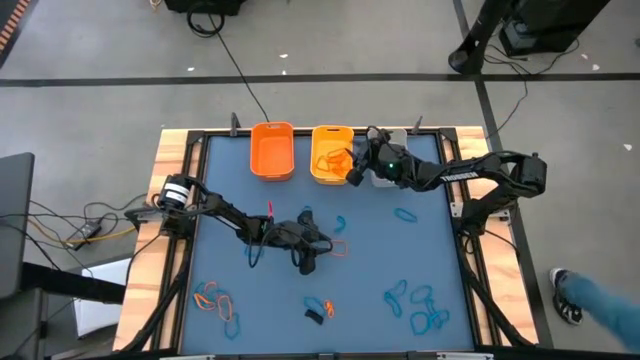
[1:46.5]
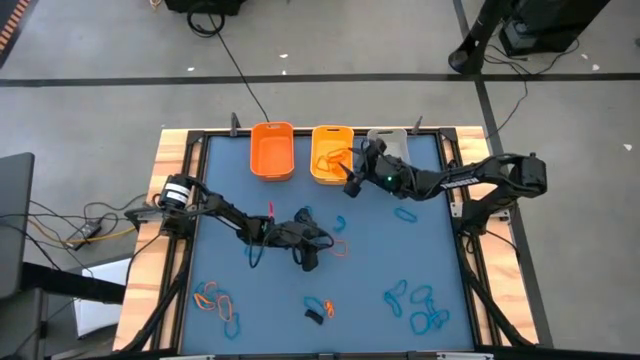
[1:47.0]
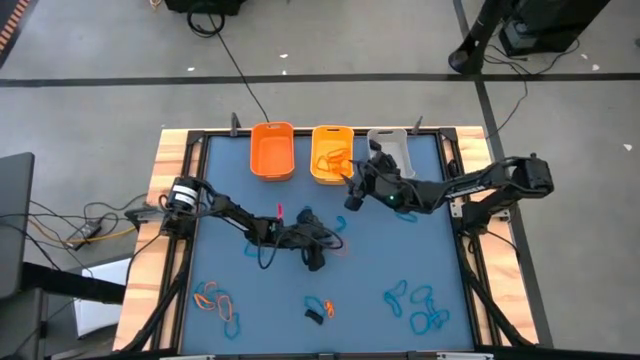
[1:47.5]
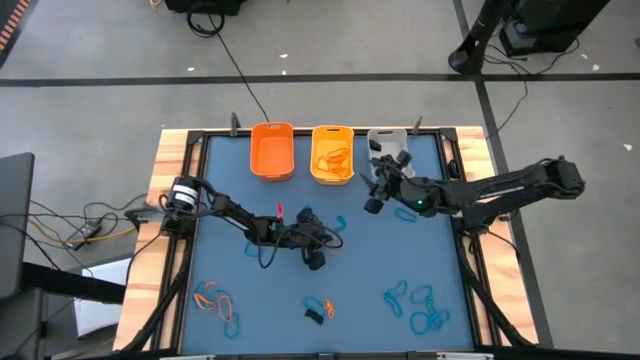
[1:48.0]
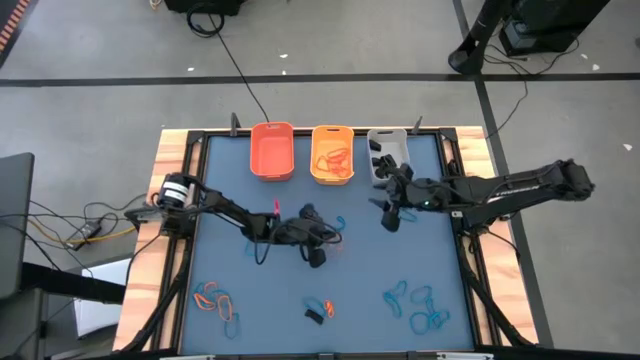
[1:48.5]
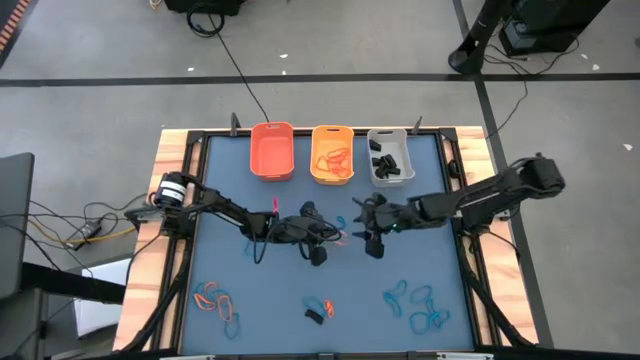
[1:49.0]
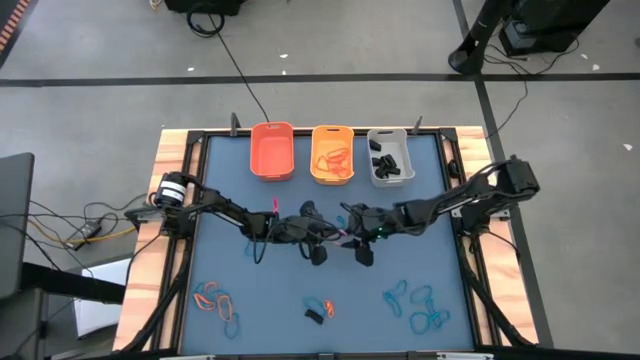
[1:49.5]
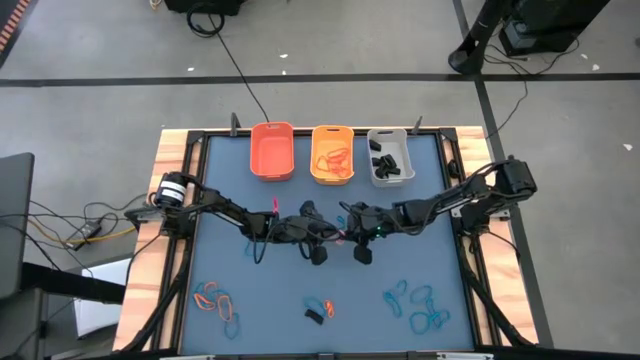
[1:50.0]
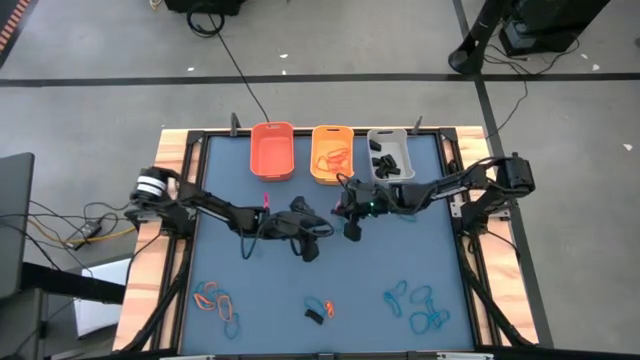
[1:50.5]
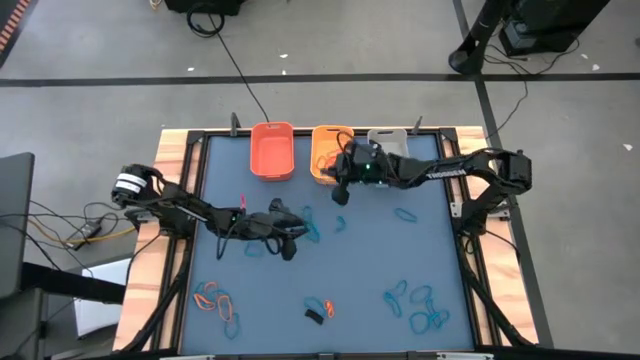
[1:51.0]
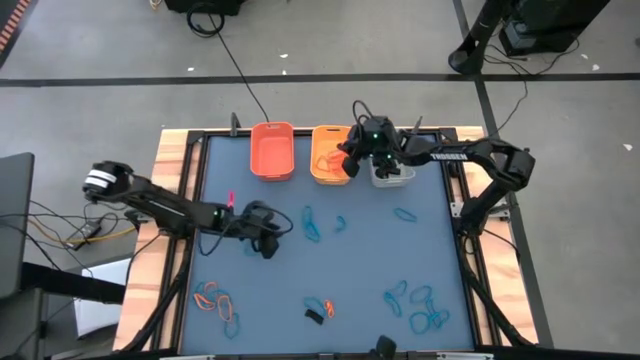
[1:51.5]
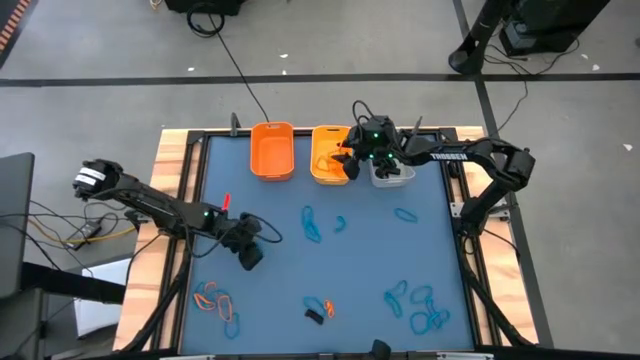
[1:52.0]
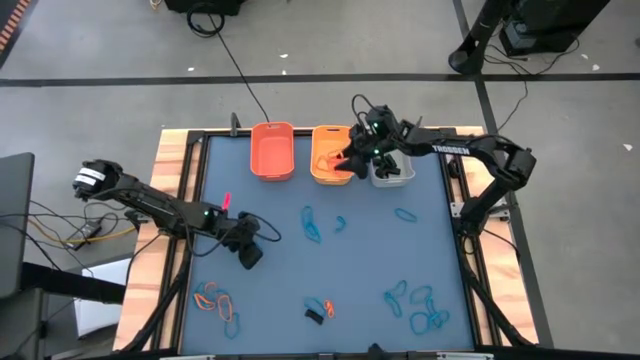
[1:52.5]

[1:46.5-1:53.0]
Task: Sort rubber bands into baskets
Put the orange rubber band into the yellow bin

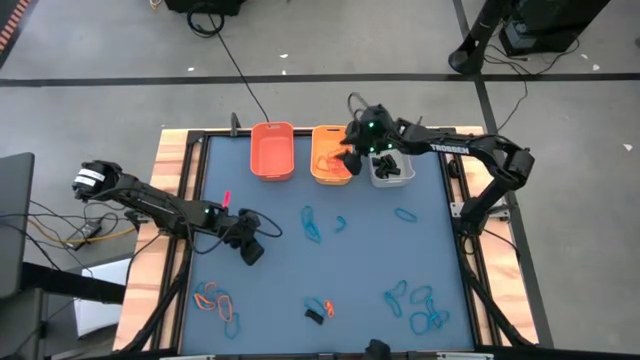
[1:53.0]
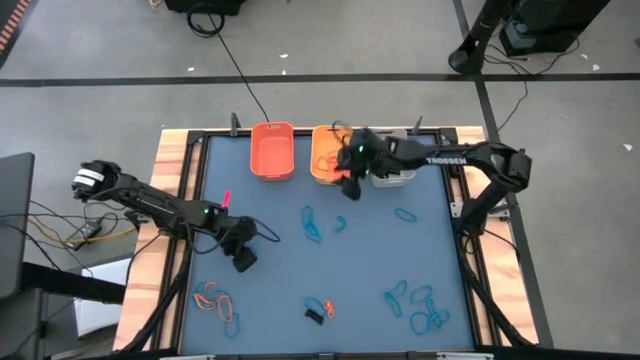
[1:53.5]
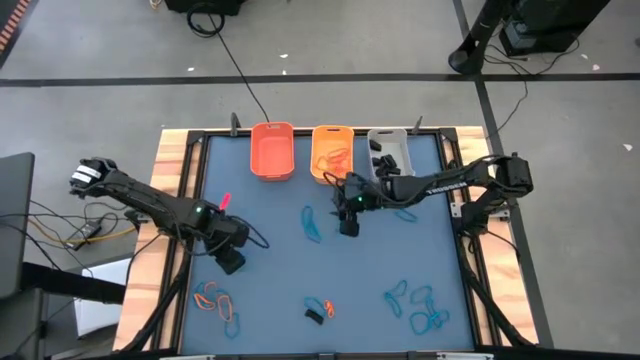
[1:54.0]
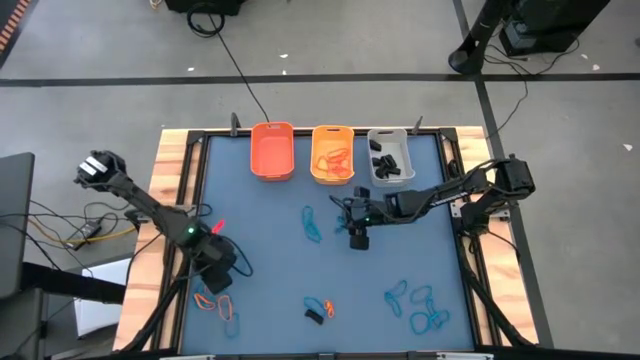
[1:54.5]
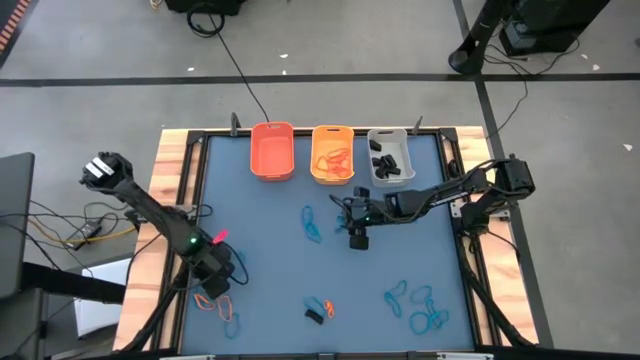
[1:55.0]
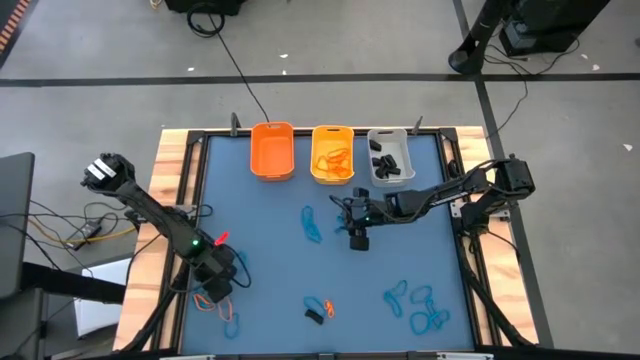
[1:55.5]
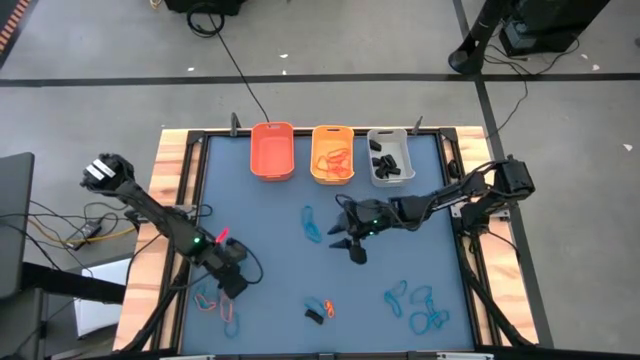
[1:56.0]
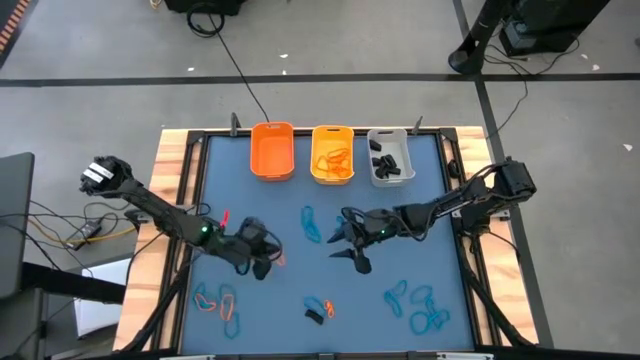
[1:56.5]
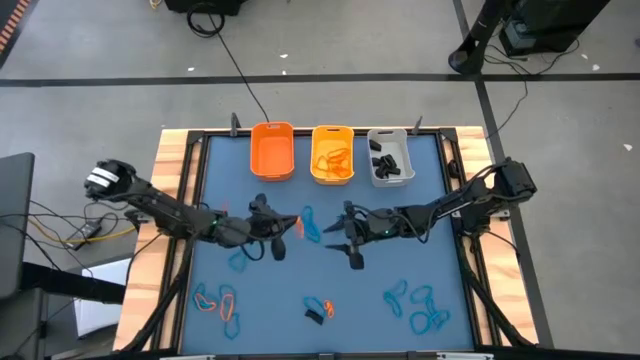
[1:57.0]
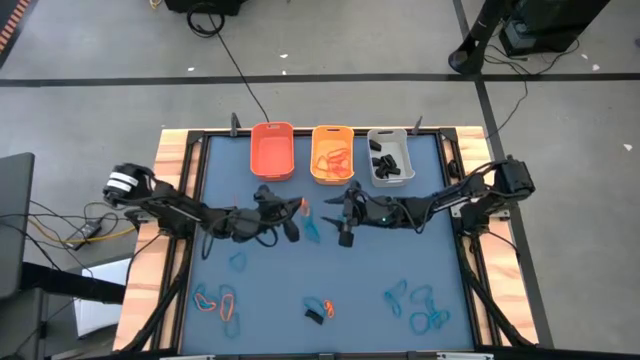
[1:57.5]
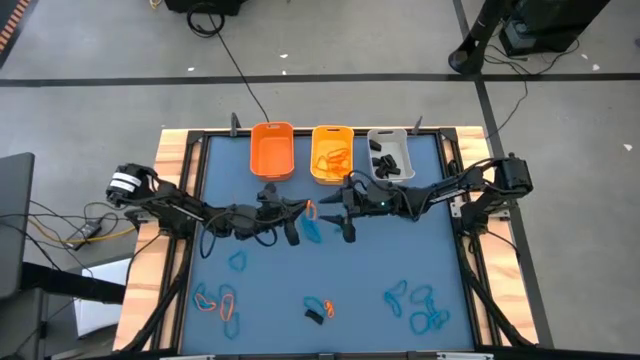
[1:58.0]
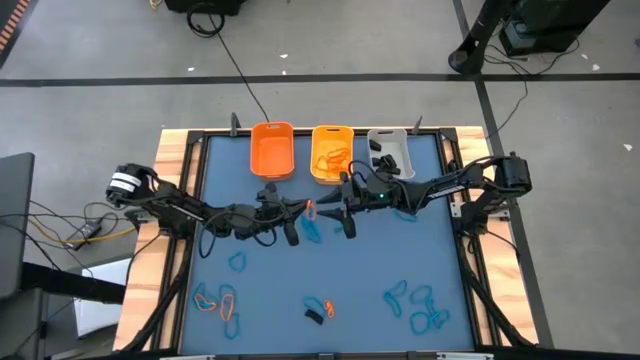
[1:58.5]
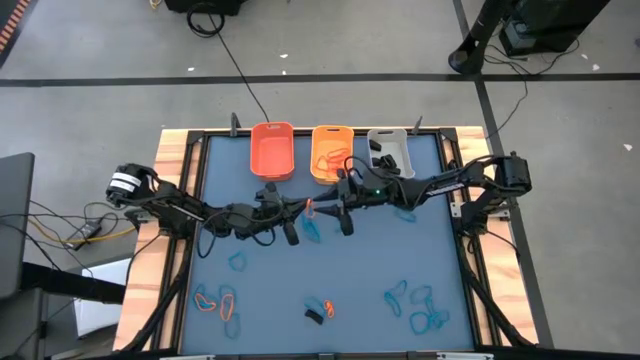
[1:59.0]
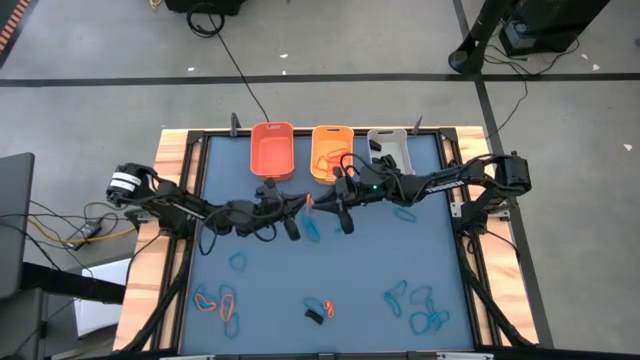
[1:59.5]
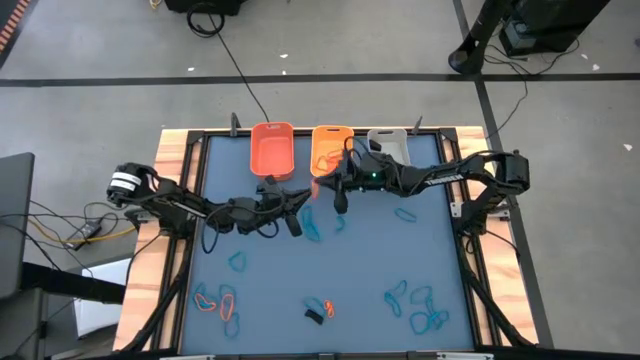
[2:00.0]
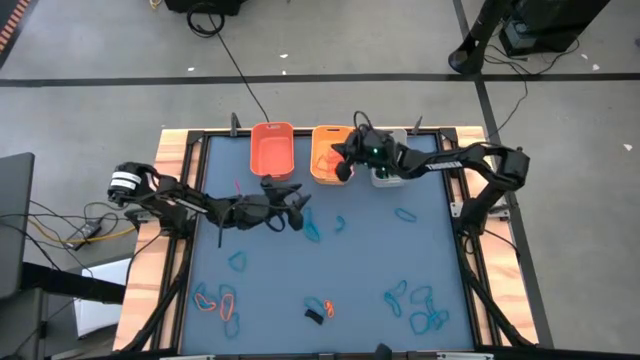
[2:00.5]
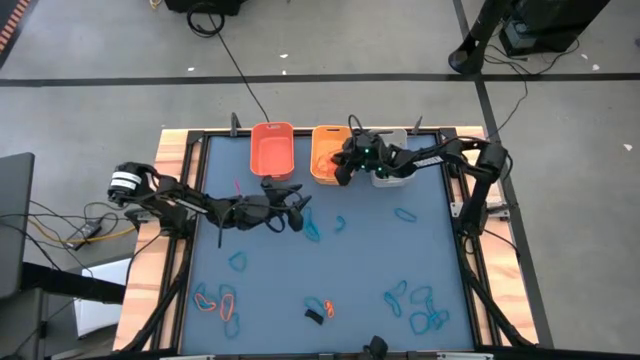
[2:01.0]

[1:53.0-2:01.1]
Put the orange rubber band into the yellow bin

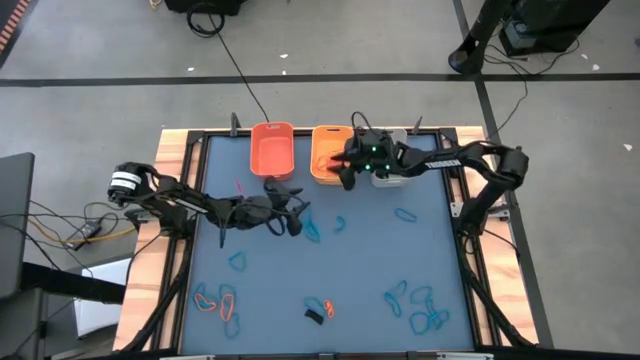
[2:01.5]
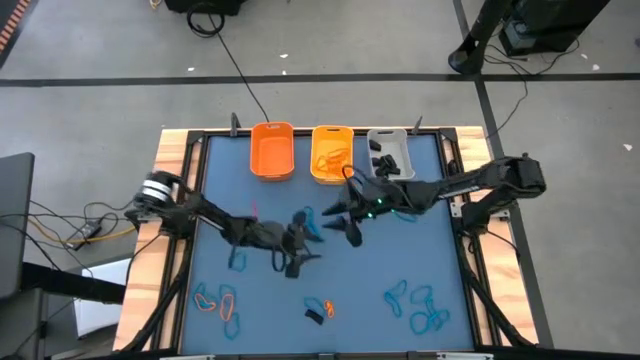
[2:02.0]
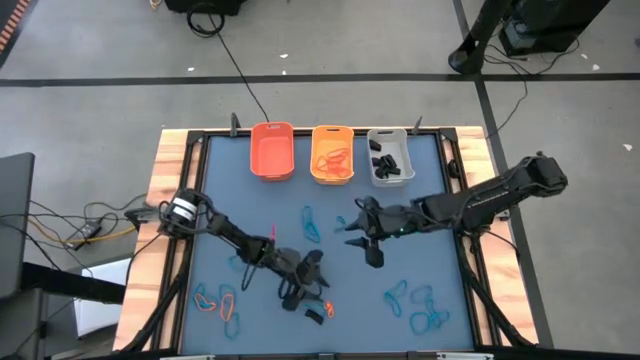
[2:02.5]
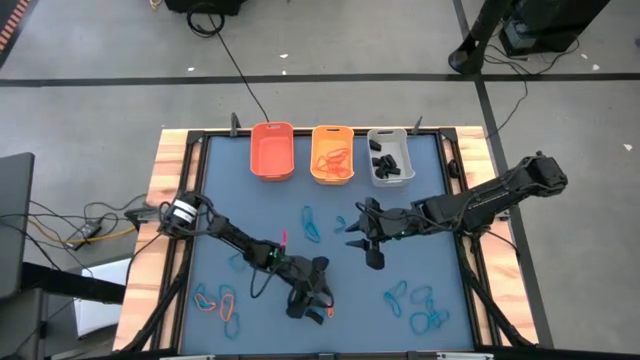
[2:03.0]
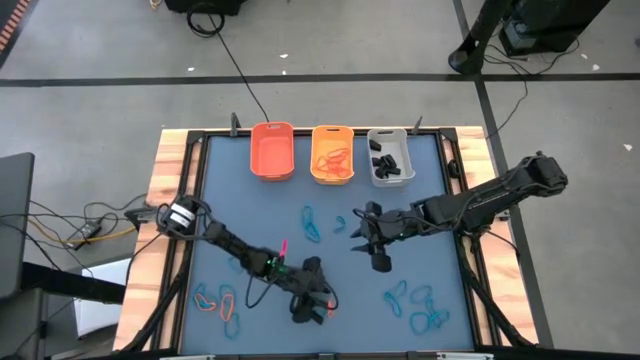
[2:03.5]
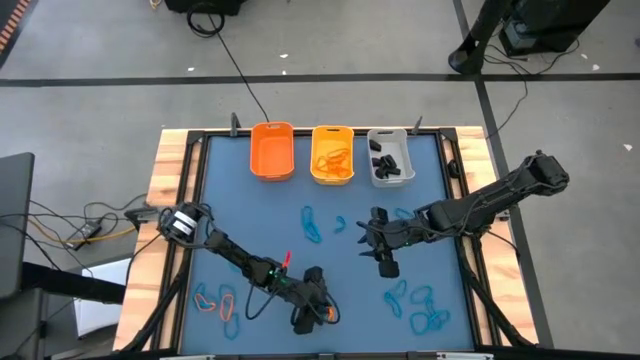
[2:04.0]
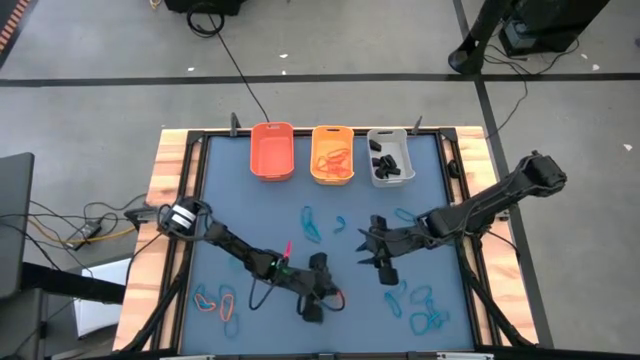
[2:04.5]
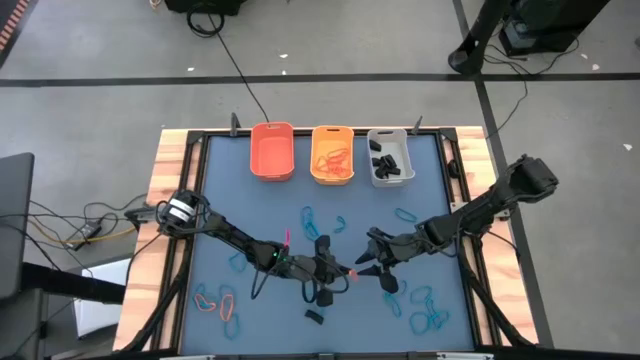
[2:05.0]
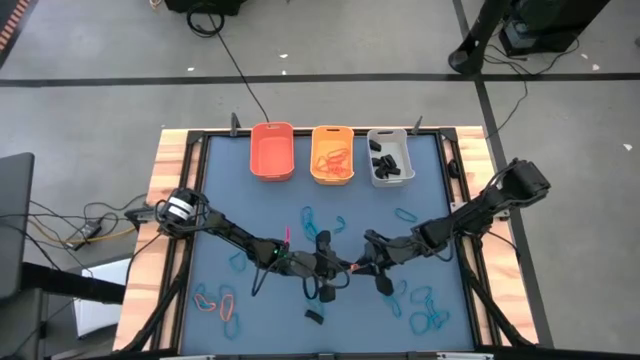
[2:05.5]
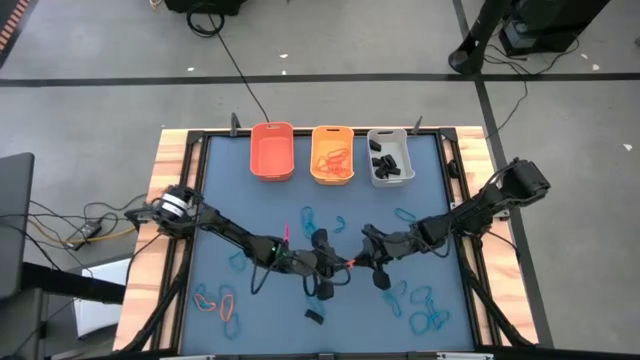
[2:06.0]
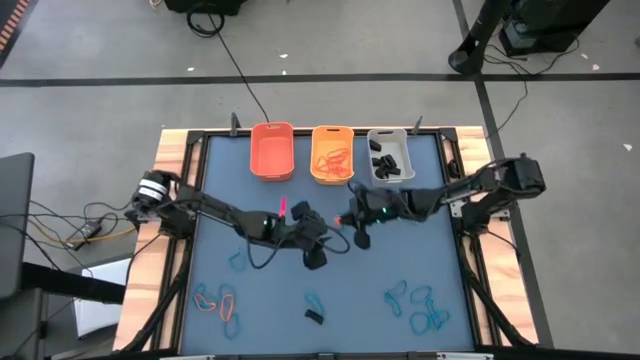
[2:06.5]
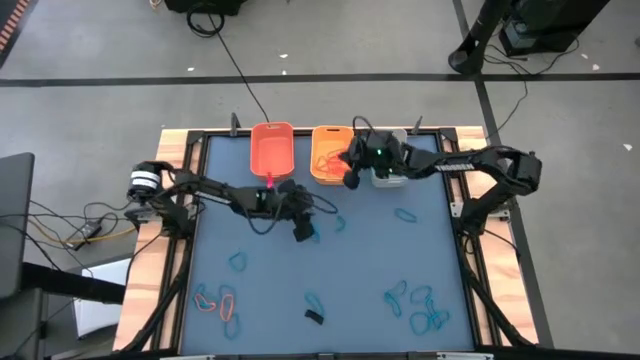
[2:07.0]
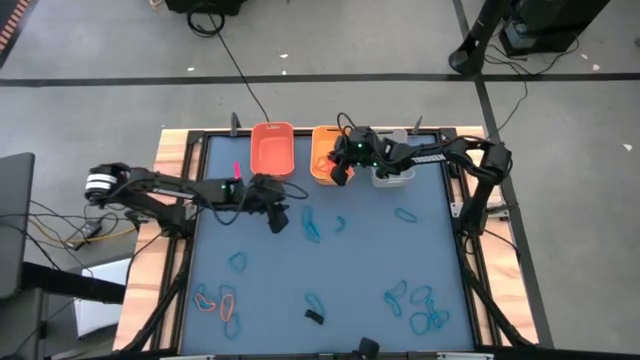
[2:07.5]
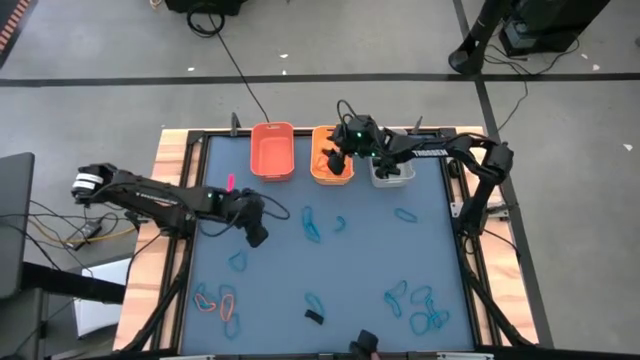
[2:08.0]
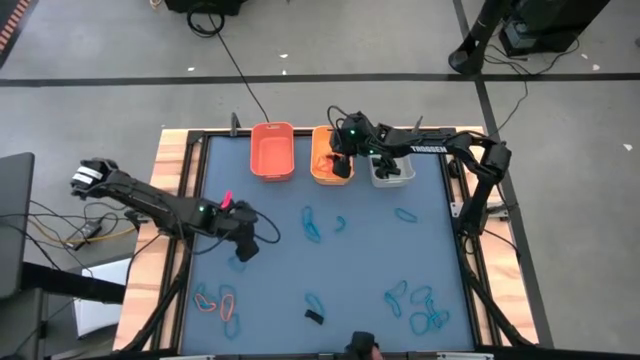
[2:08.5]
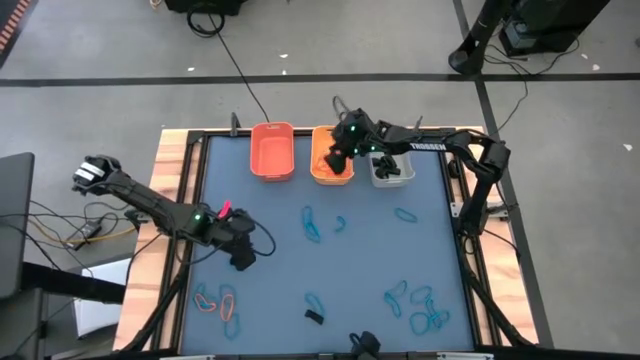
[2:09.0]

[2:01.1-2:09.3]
Put the orange rubber band into the yellow bin
